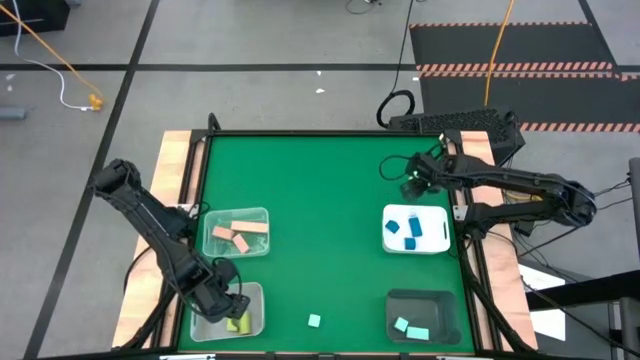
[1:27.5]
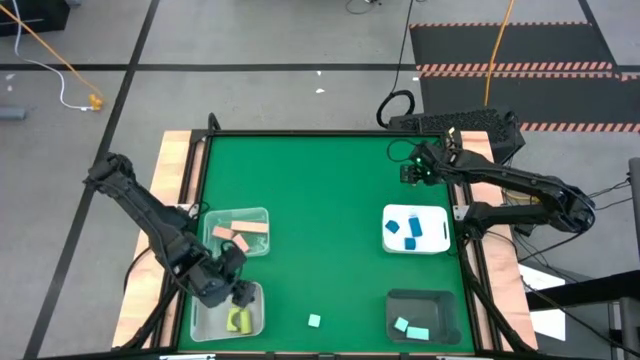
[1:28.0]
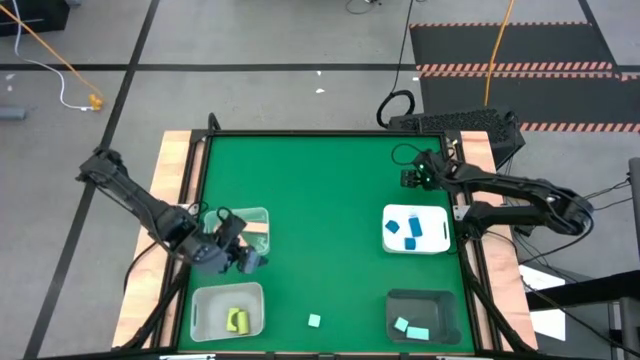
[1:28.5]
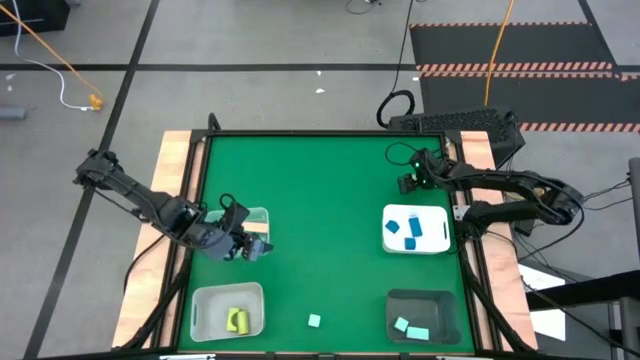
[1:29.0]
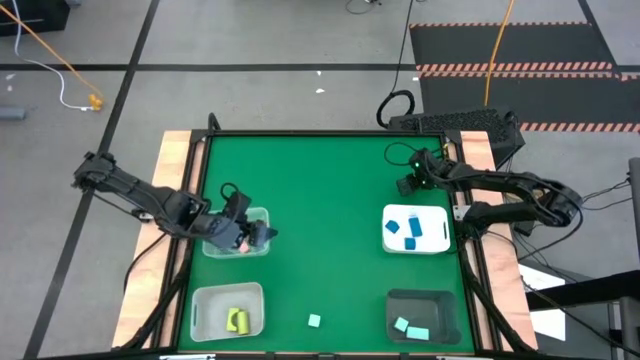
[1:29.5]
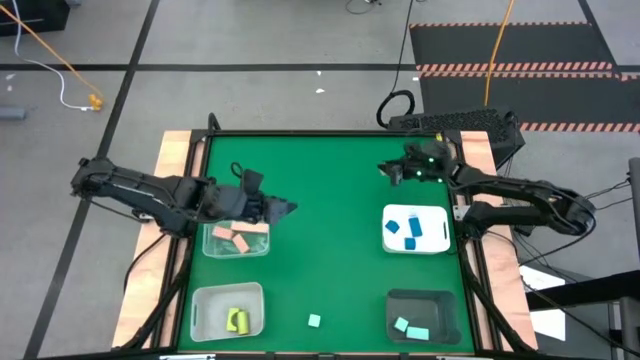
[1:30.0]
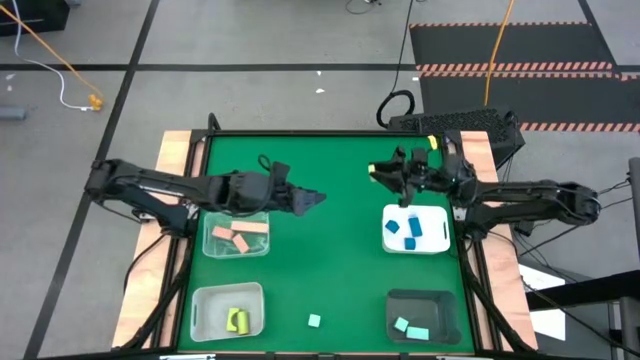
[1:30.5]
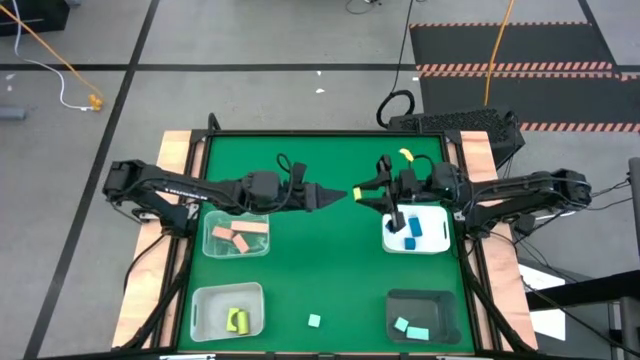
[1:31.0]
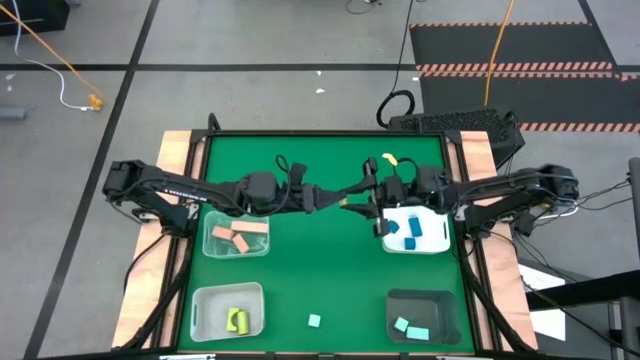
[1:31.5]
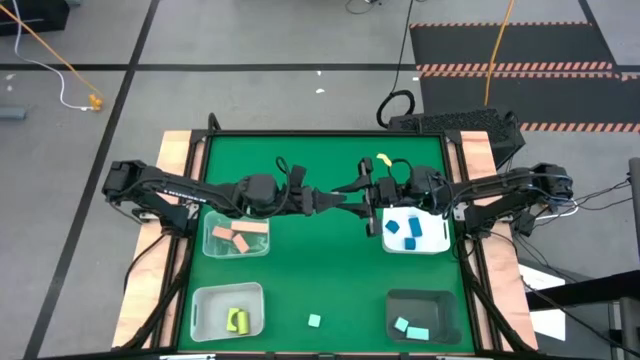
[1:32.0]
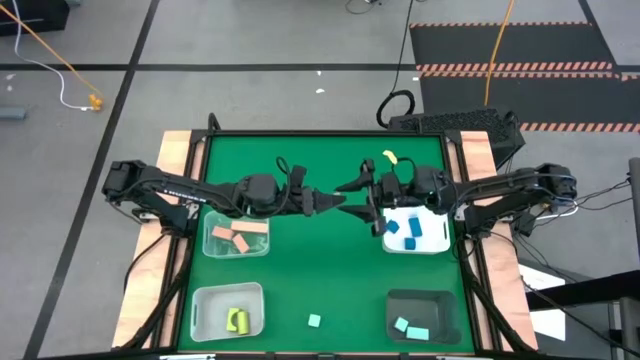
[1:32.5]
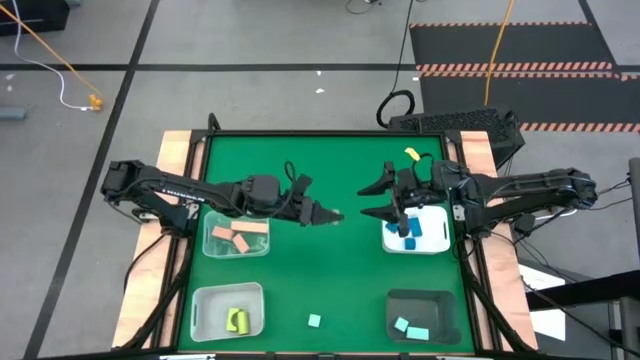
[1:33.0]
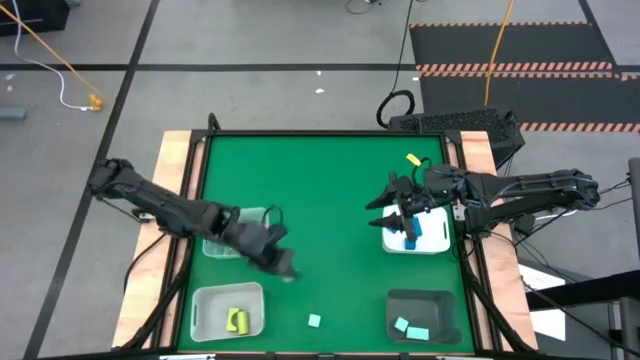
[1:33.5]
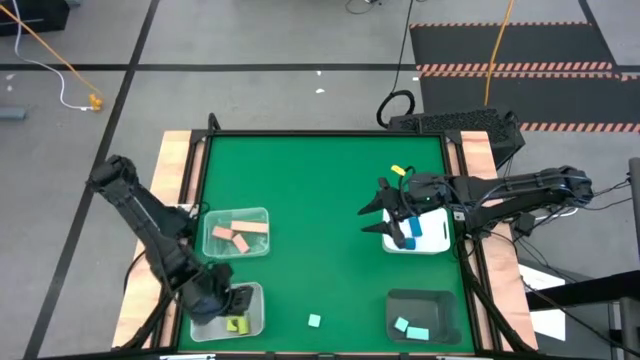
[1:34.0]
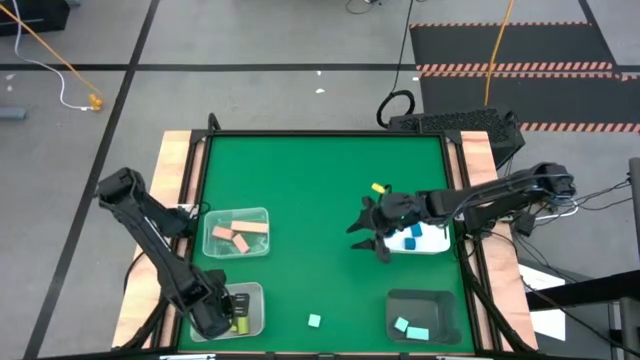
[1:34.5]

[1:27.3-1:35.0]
Task: Sort & place blocks by color
Put the yellow block into the gray bin

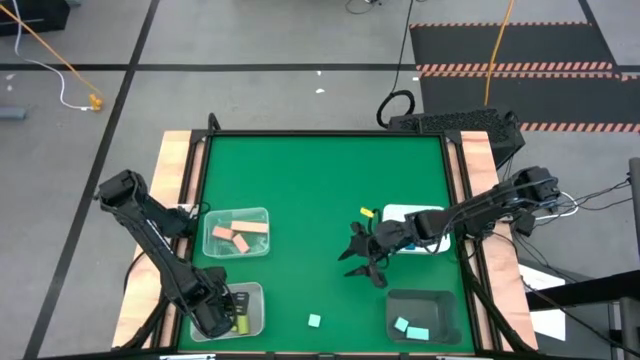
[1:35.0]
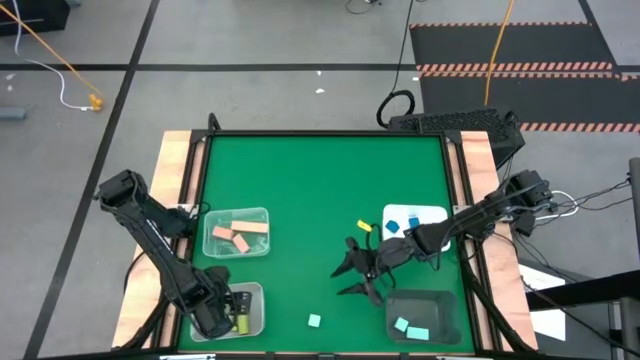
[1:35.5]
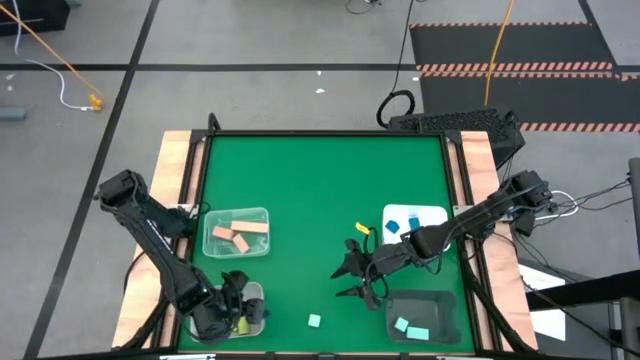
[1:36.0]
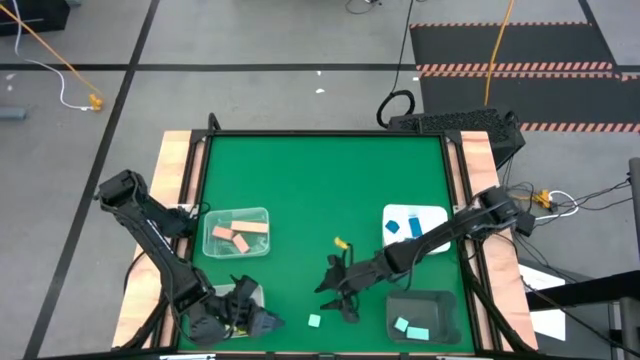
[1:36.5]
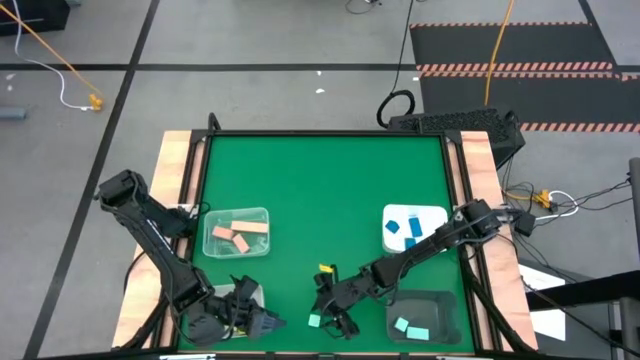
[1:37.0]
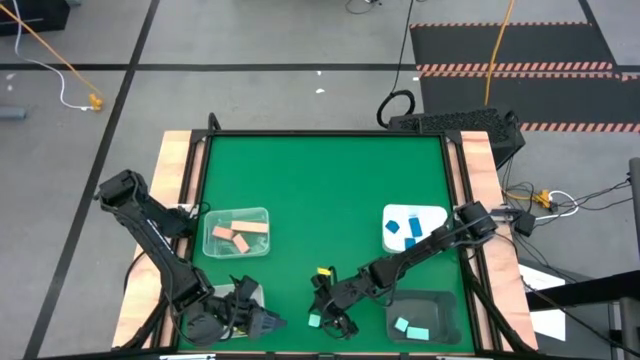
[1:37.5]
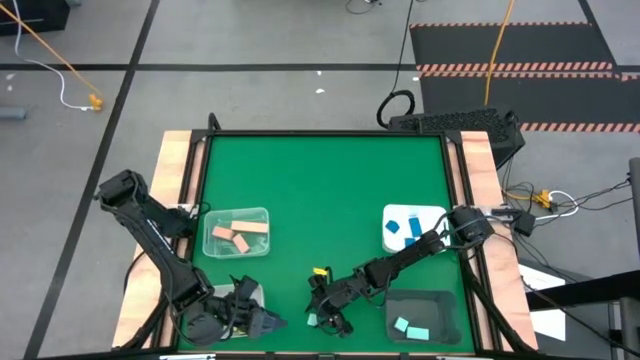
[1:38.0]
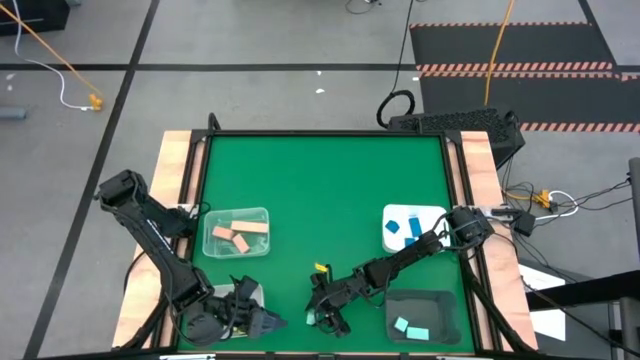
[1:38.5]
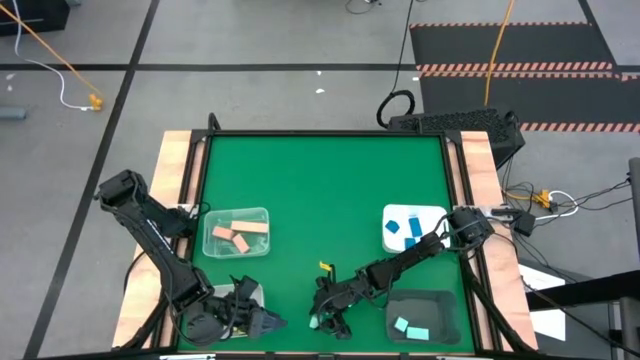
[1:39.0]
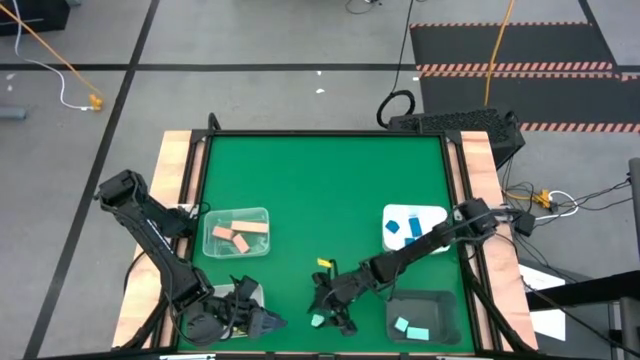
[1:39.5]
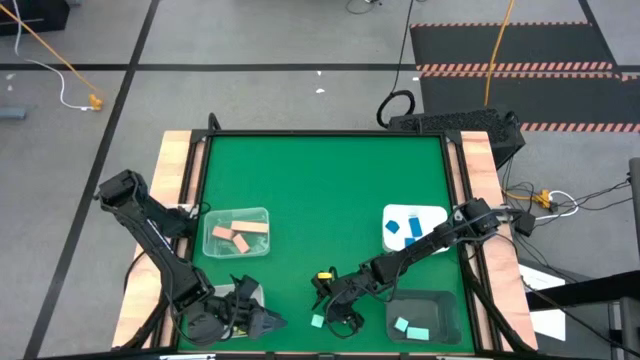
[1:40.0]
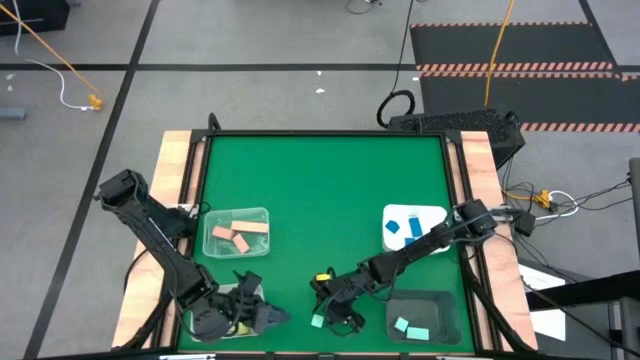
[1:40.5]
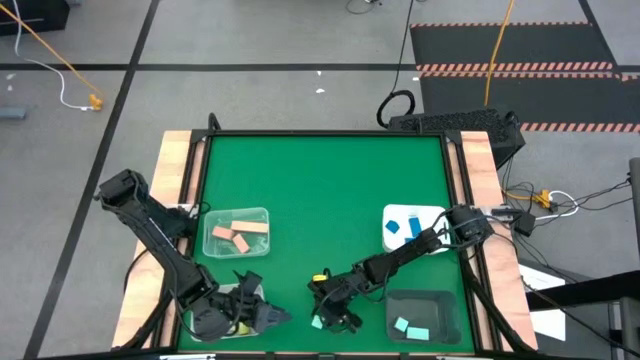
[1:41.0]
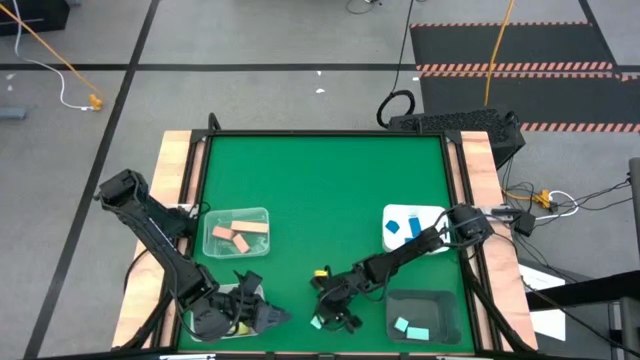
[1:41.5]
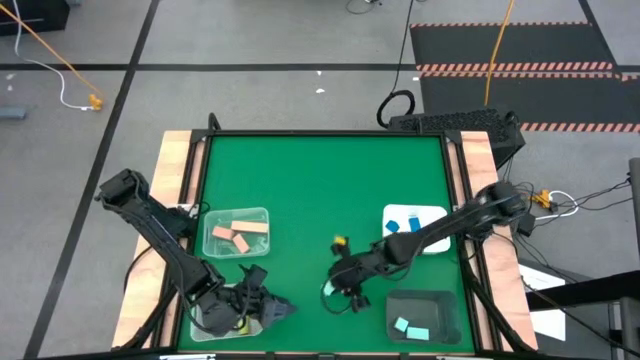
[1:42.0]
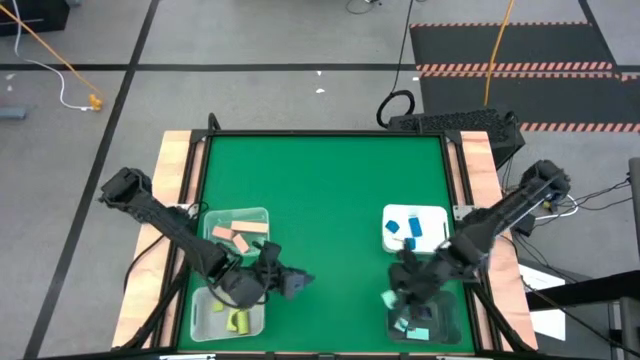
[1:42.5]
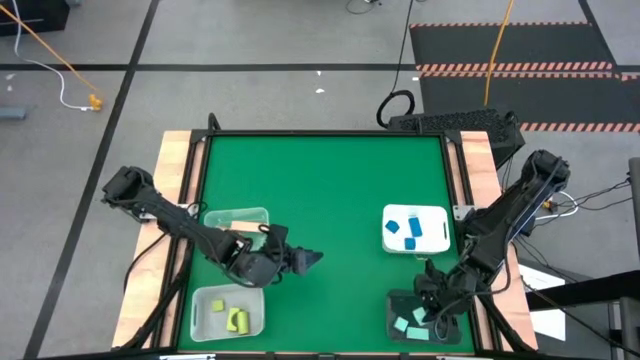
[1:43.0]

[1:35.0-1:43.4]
Put the light blue block into the black bin

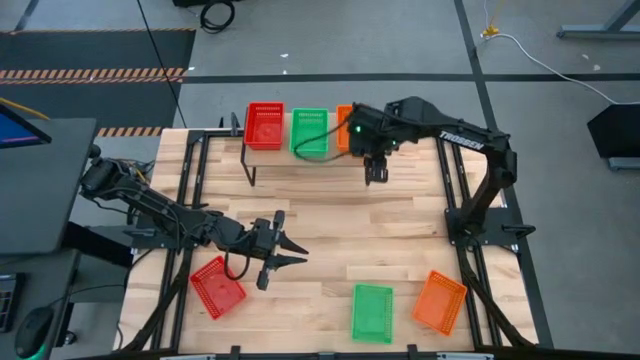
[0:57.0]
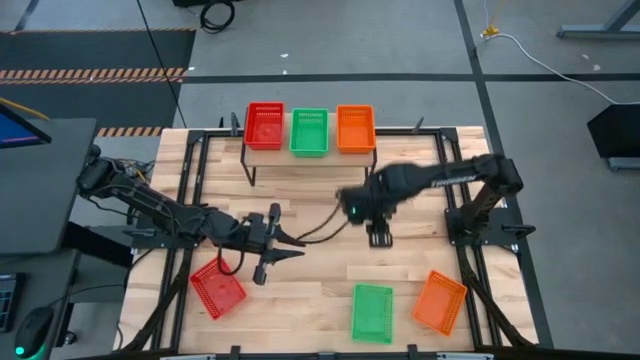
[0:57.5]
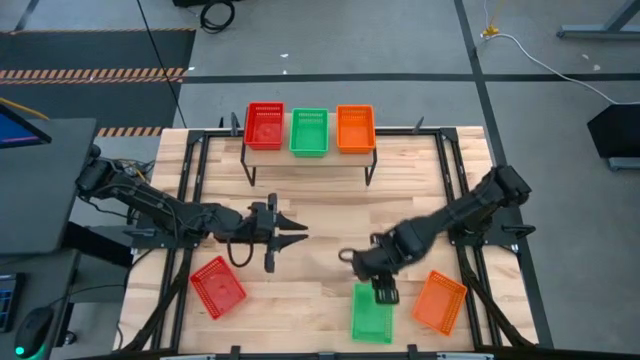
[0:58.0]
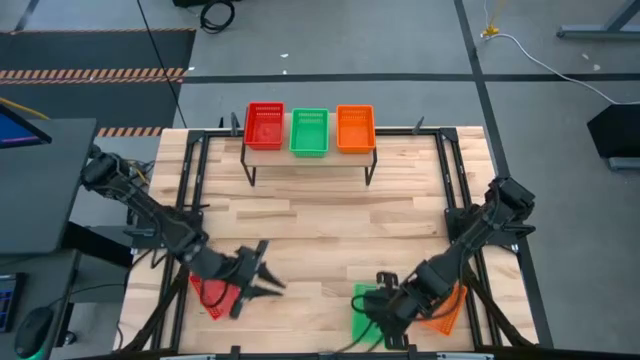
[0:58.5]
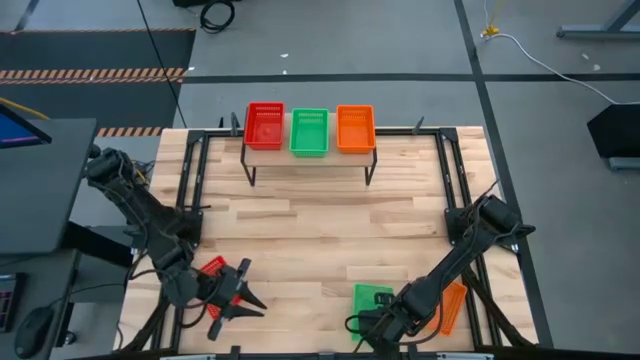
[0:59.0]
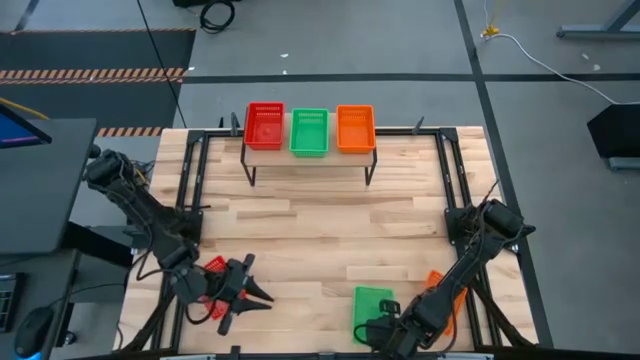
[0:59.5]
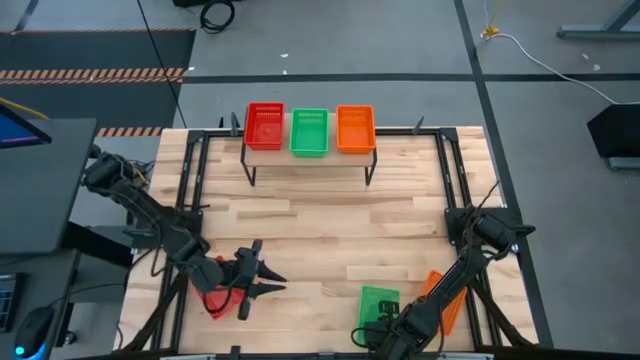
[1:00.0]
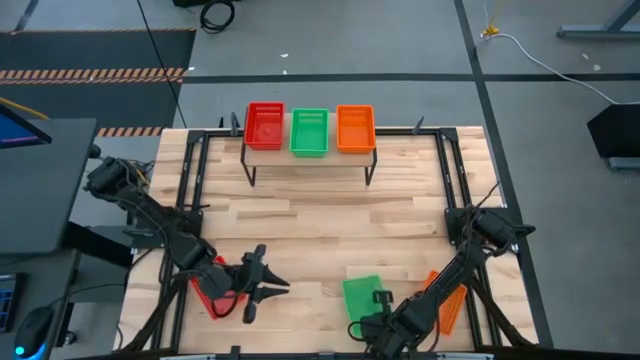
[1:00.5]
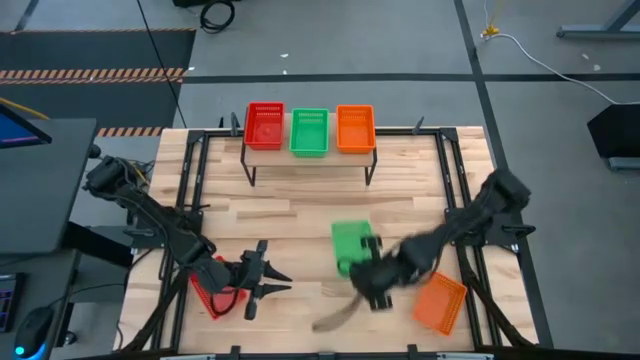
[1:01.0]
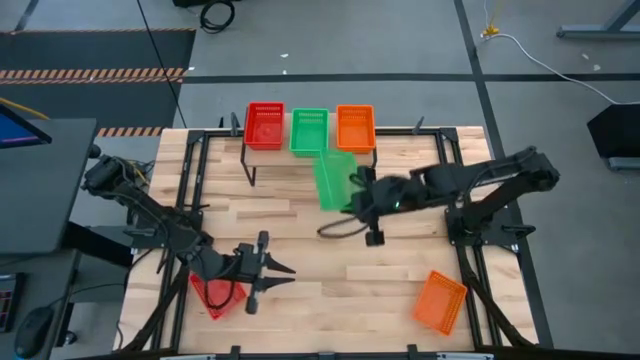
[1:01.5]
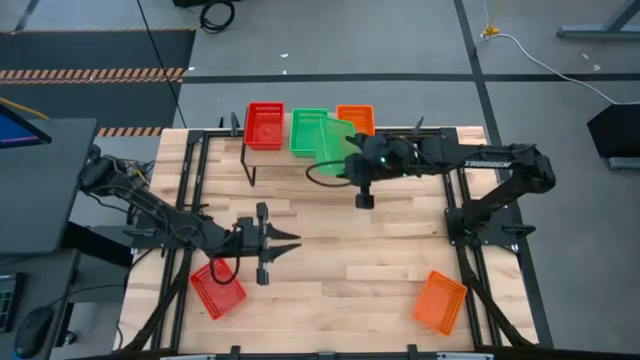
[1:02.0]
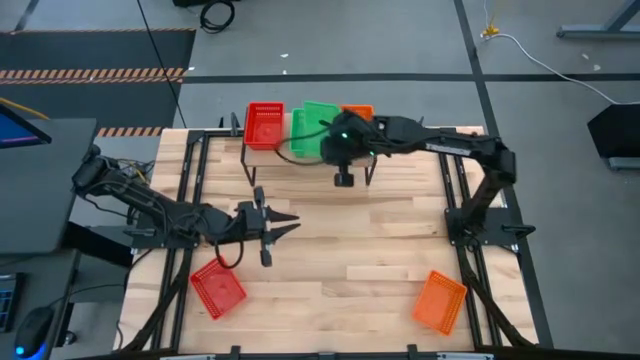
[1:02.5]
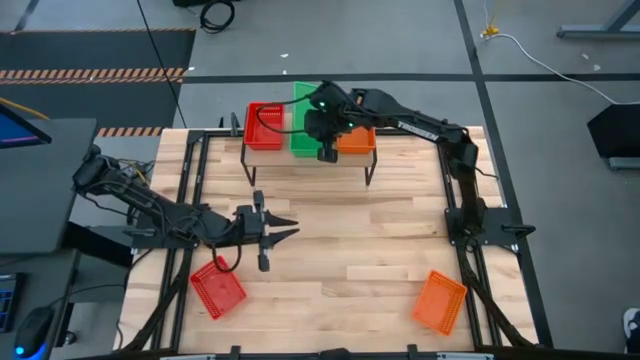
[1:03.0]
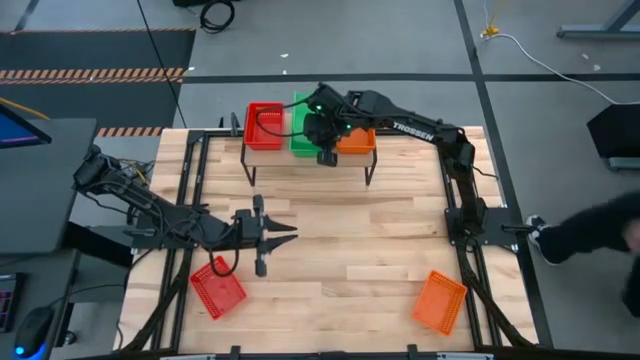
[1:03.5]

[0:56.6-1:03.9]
Task: Stack baskets on shelf by color
Stack the green basket on top of the green basket on the shelf
